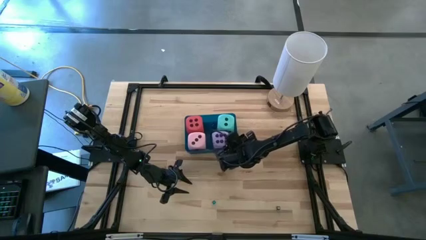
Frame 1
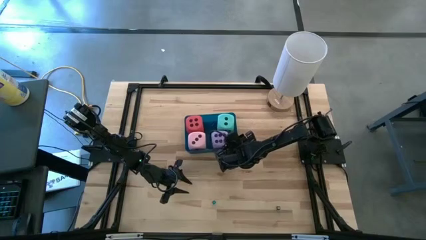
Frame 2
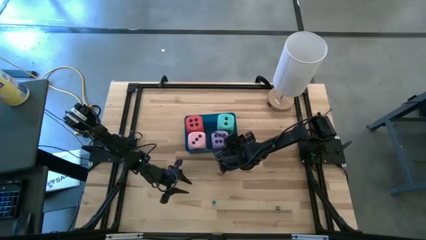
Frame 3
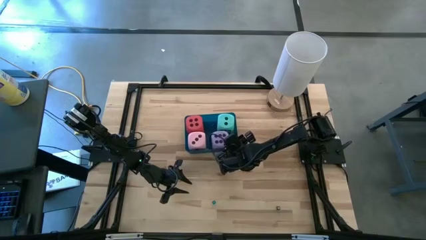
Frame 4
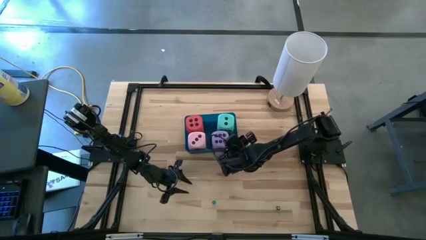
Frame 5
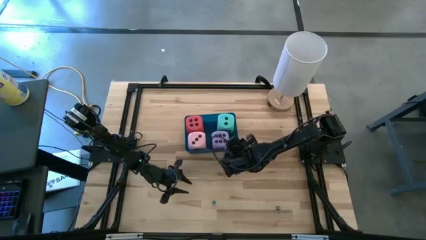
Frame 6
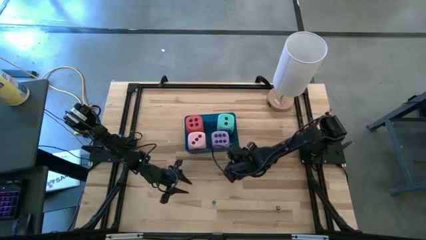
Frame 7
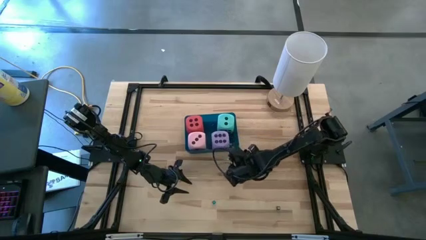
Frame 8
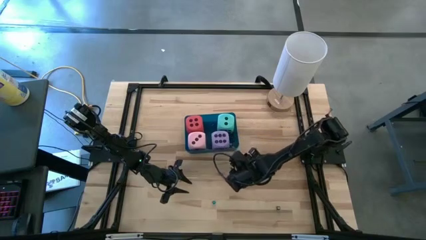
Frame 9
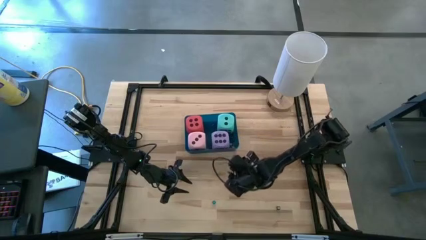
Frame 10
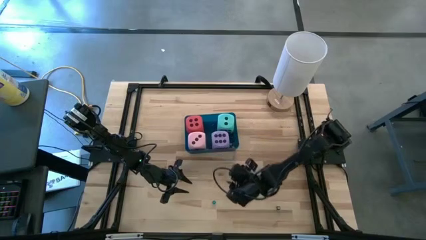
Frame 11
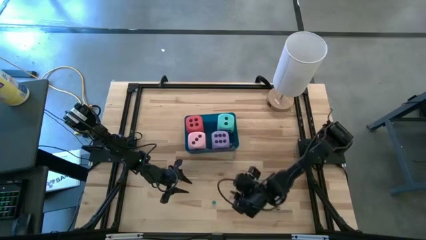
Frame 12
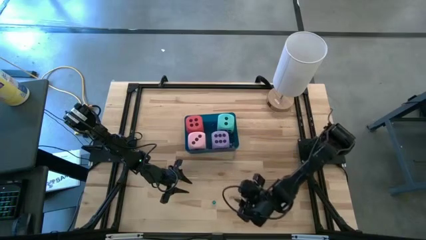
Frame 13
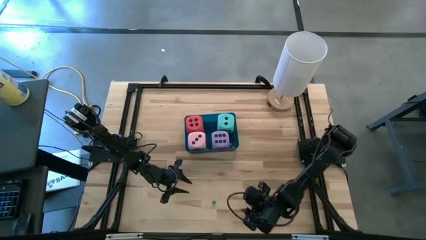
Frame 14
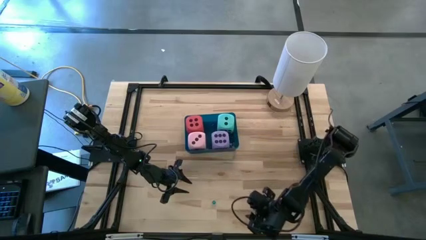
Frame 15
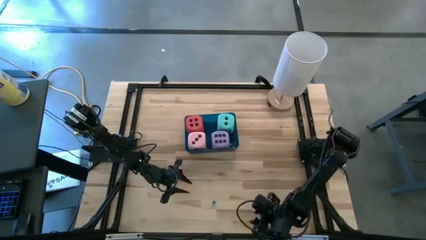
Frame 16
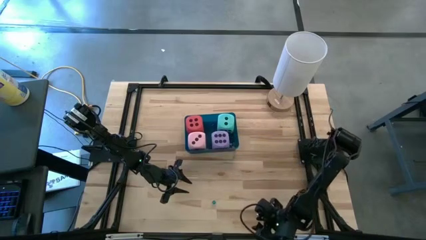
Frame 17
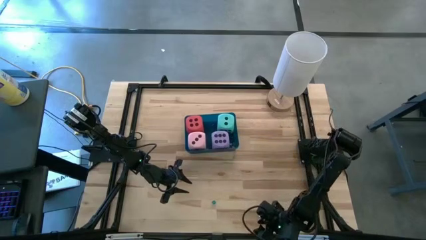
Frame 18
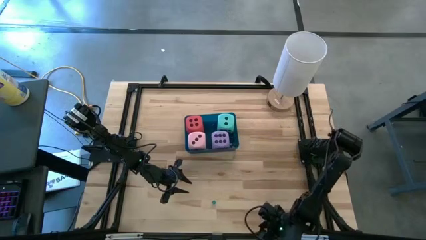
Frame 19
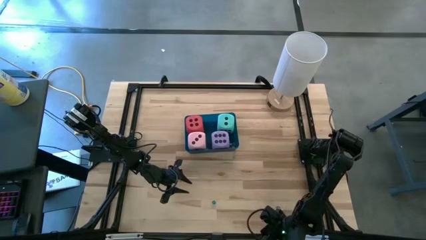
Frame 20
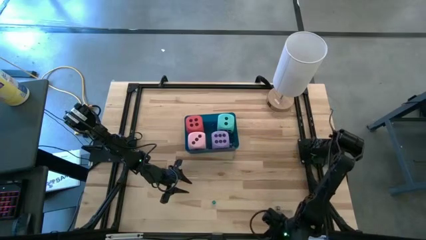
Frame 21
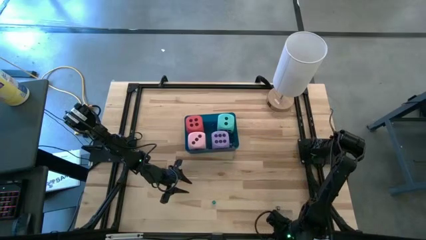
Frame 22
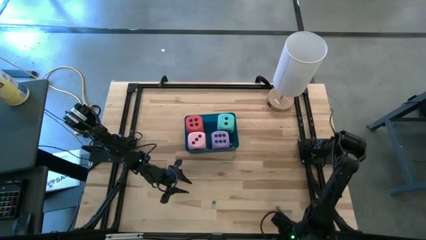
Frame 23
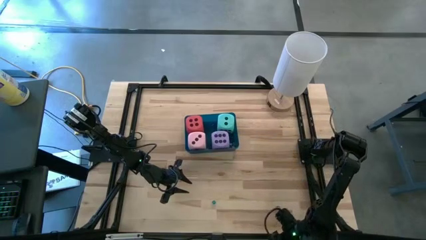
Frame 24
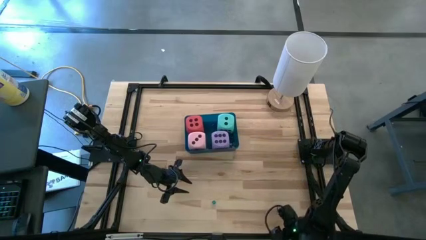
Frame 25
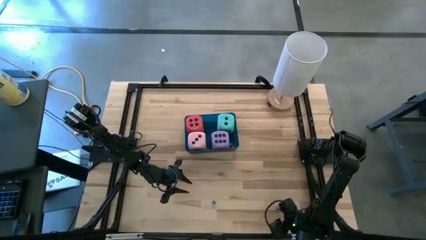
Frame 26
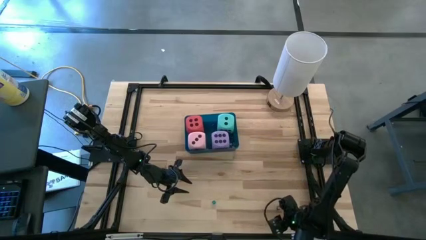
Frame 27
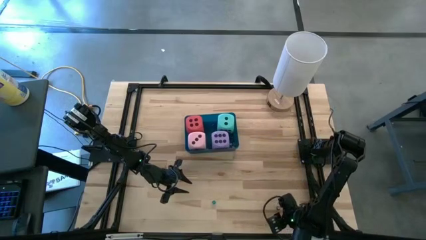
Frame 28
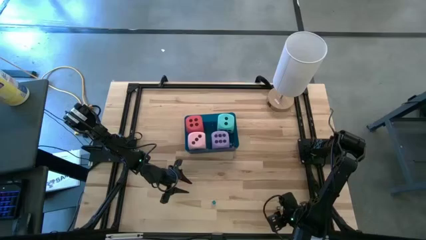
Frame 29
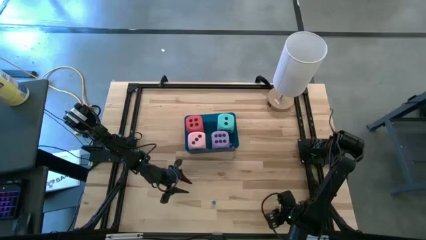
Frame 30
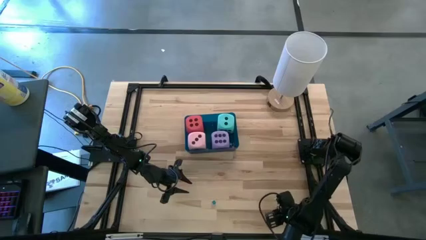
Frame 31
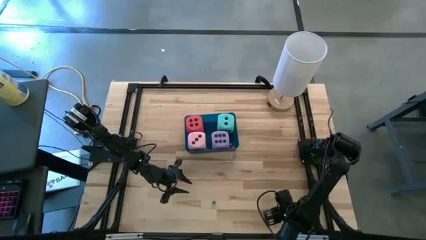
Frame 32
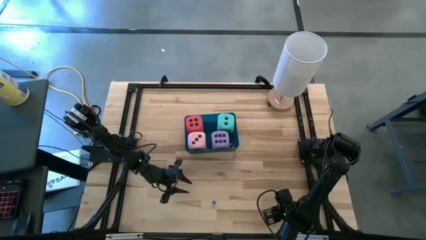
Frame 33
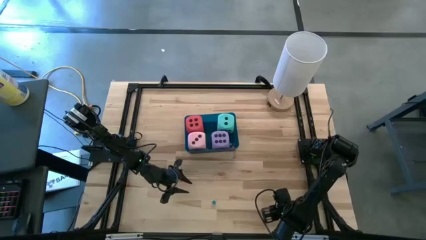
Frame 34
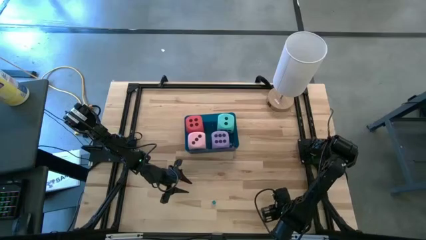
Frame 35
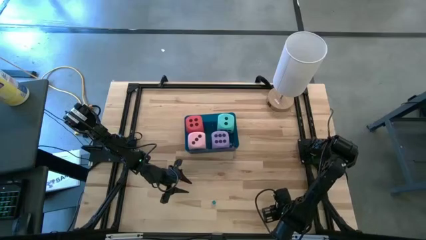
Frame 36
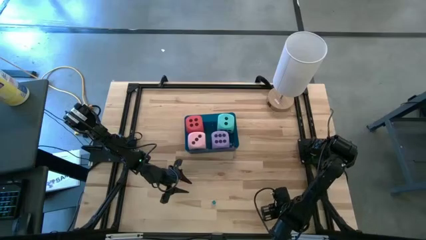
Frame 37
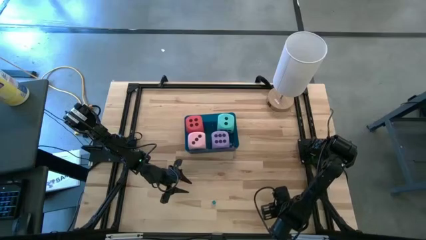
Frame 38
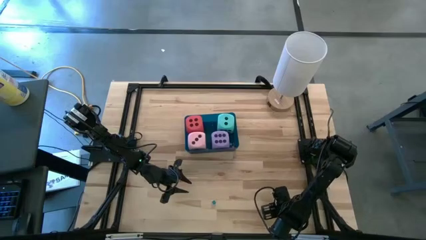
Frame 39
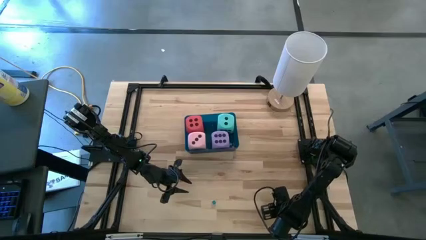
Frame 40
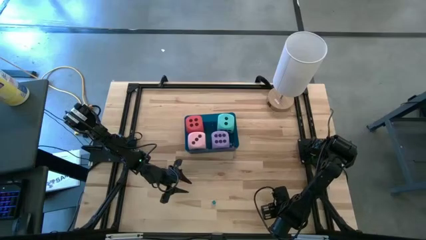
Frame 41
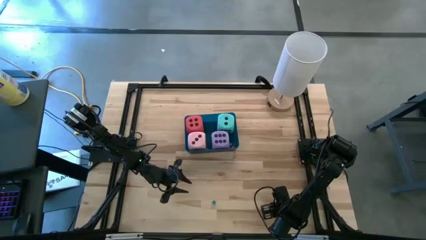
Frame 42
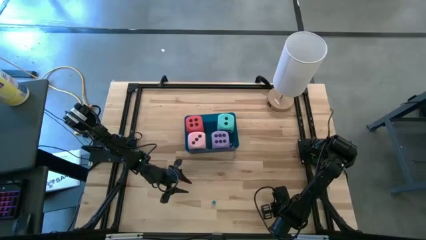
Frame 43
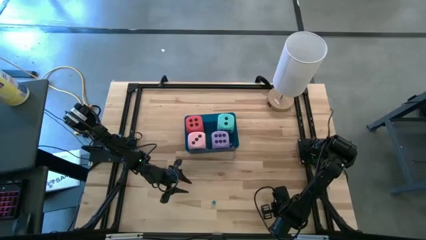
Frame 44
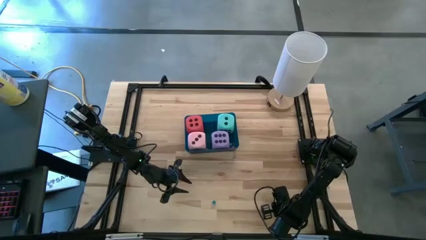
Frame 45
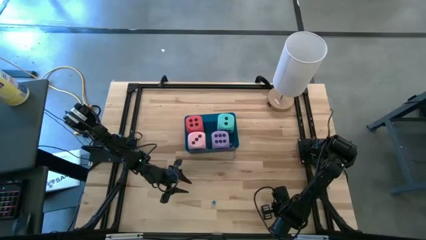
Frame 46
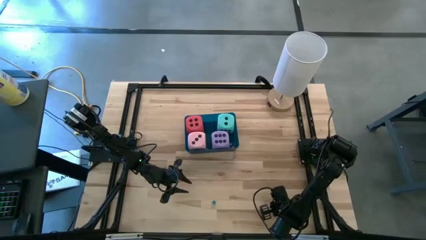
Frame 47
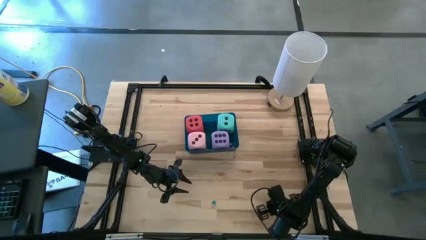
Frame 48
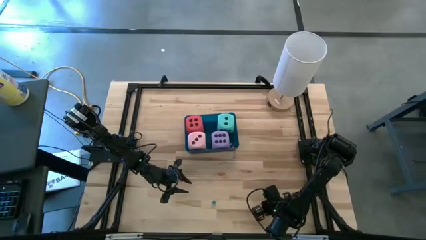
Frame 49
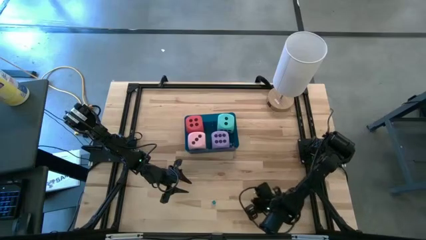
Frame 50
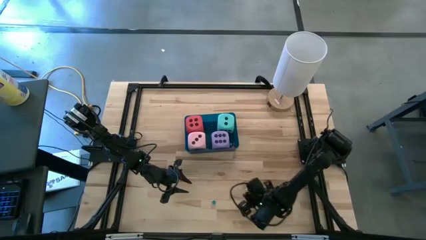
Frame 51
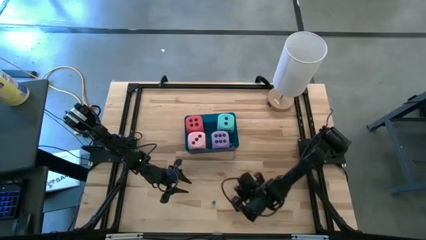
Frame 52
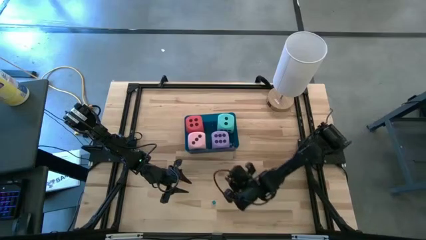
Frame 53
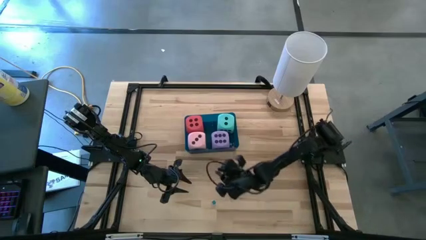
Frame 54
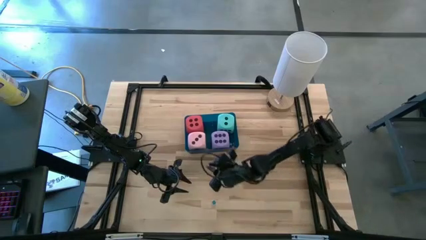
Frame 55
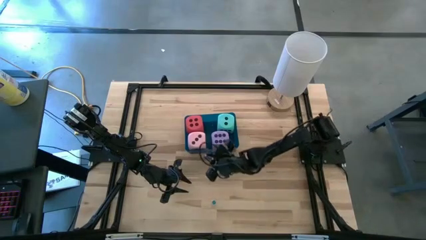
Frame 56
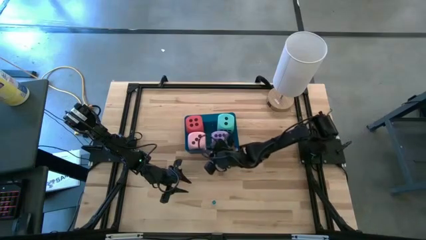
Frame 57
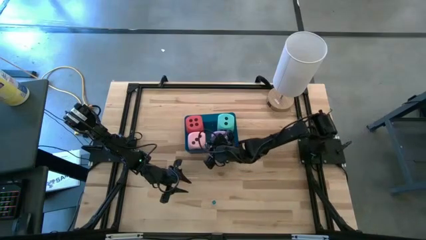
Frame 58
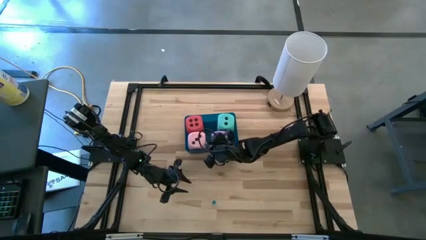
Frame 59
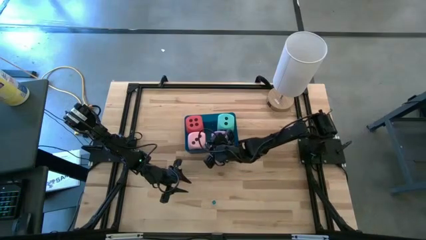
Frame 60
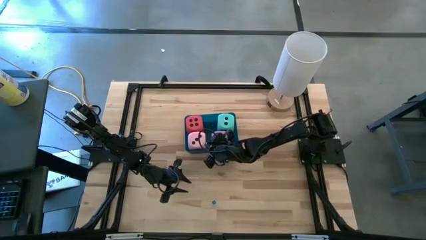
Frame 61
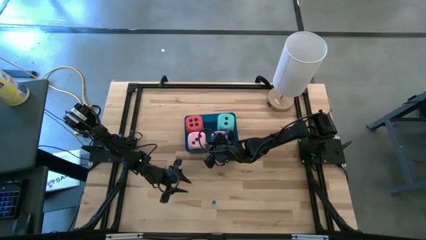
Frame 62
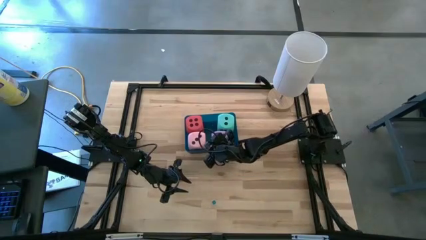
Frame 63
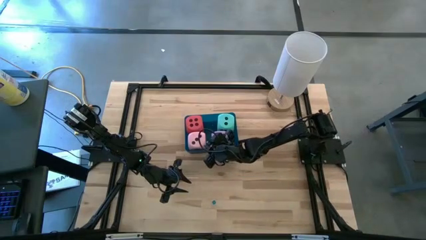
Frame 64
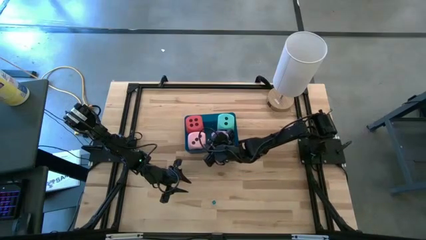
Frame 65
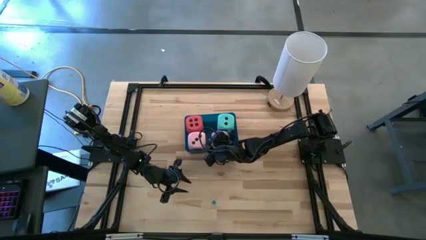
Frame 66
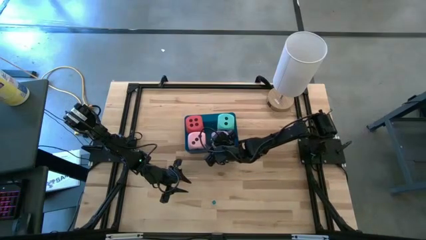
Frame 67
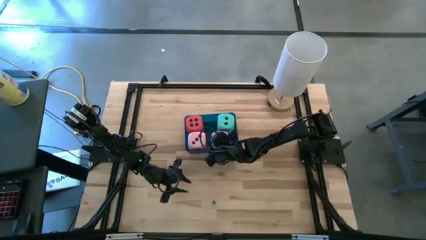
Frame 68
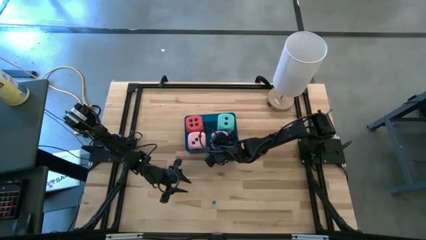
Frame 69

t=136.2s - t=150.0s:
Task: Pick & Place Dice
Put the black die into the blue bin
